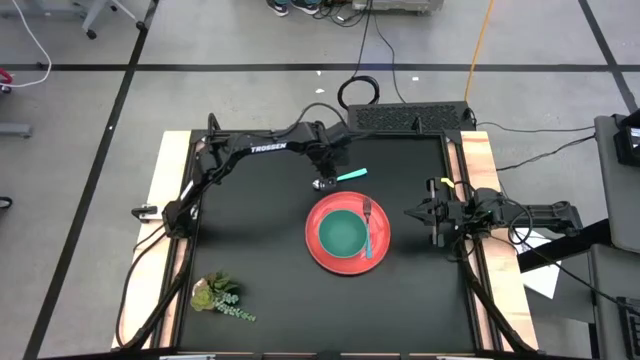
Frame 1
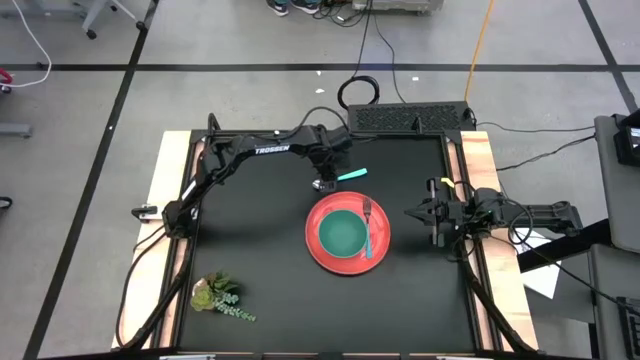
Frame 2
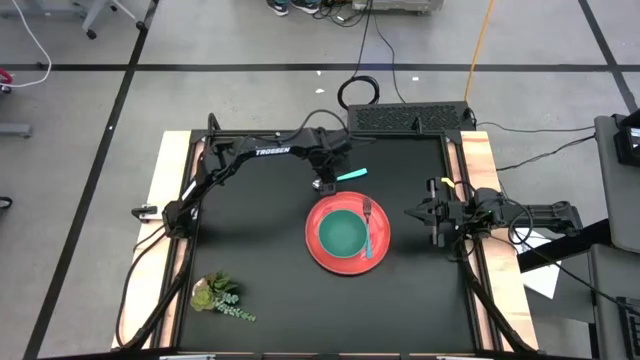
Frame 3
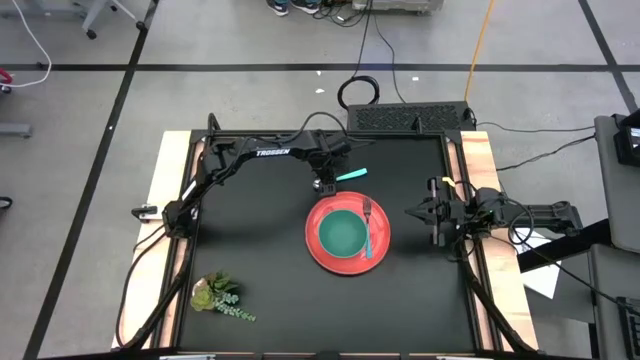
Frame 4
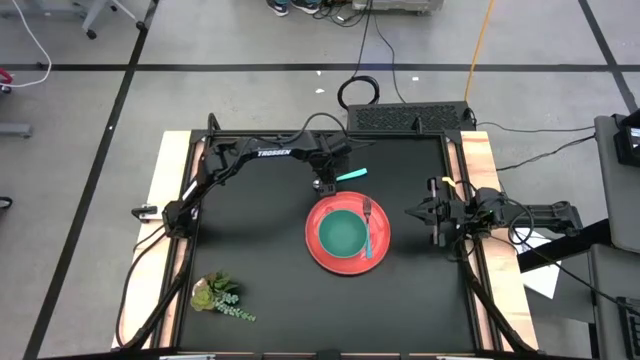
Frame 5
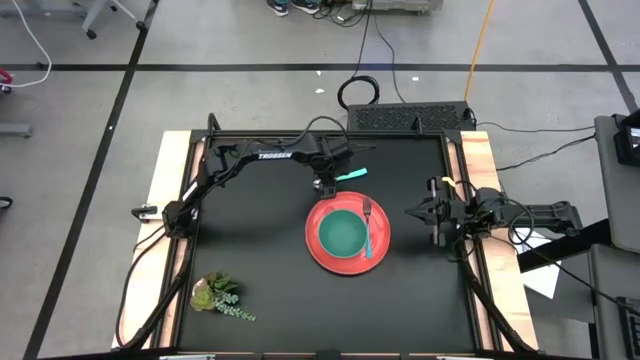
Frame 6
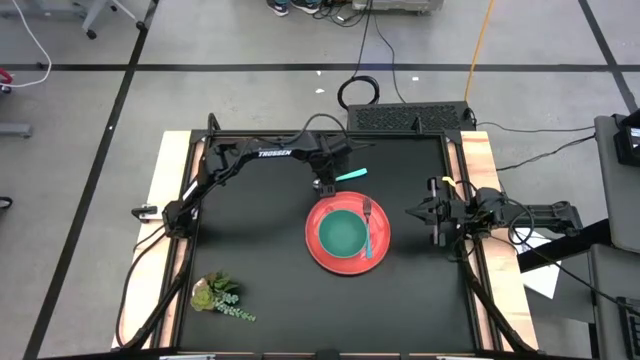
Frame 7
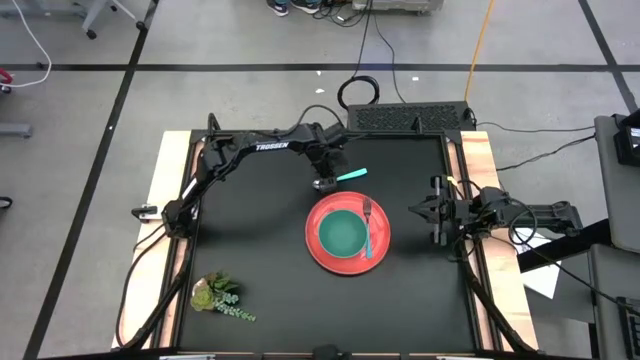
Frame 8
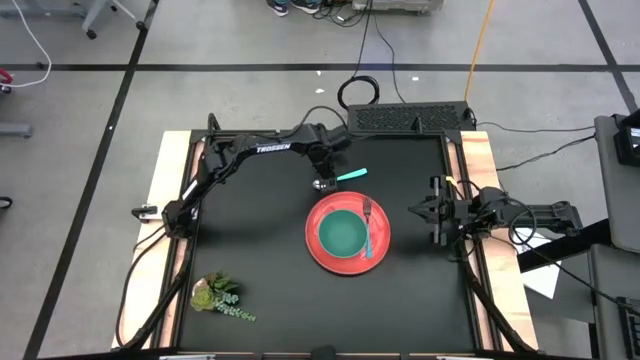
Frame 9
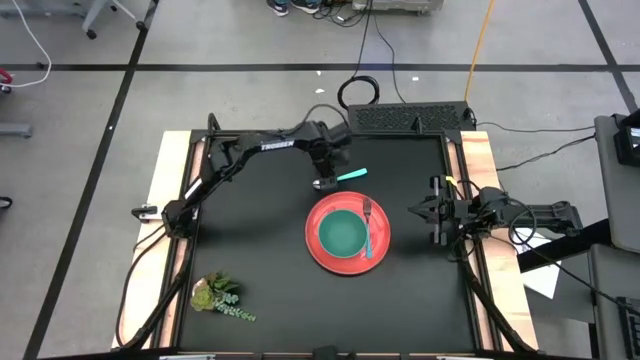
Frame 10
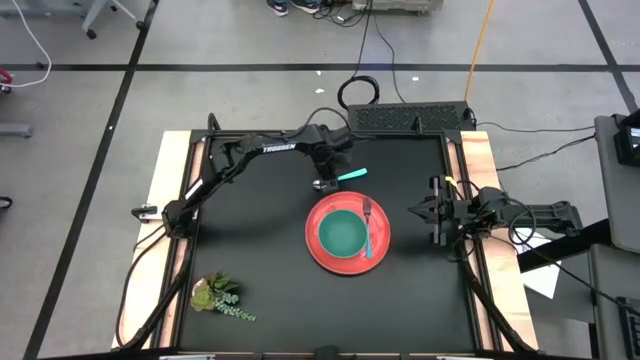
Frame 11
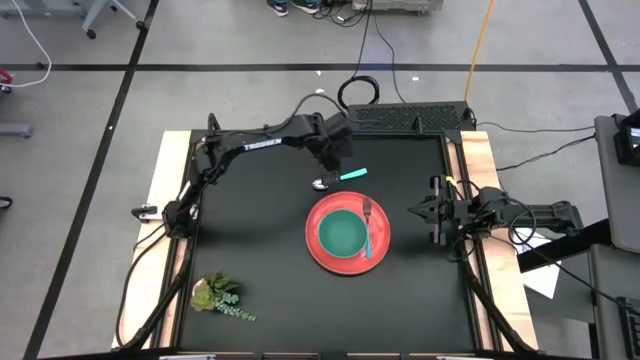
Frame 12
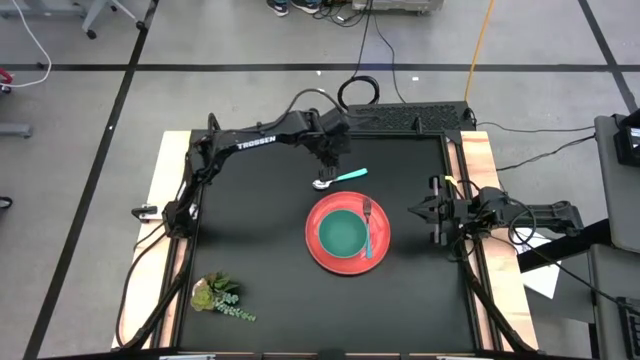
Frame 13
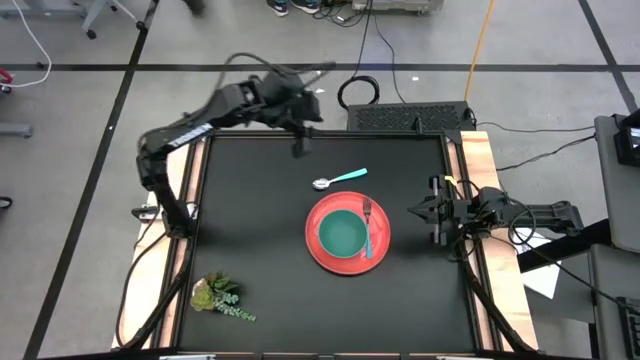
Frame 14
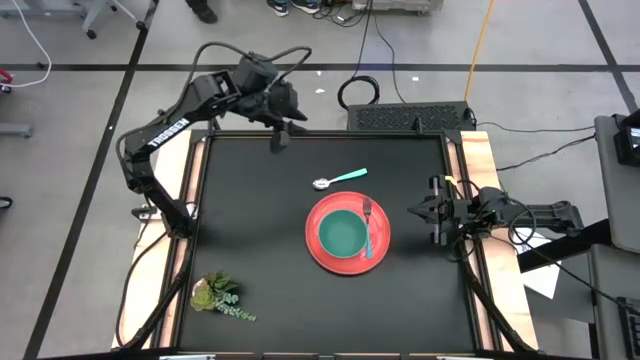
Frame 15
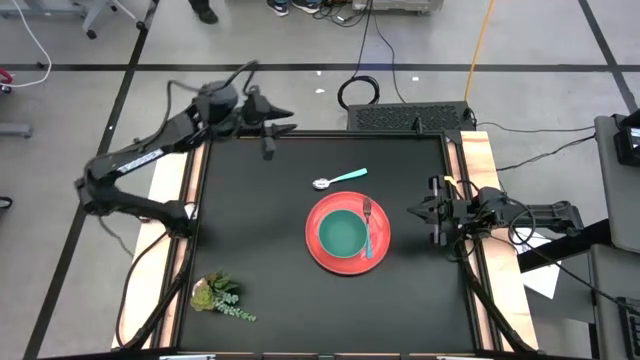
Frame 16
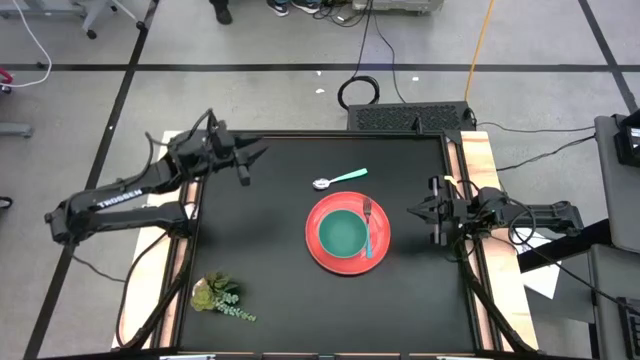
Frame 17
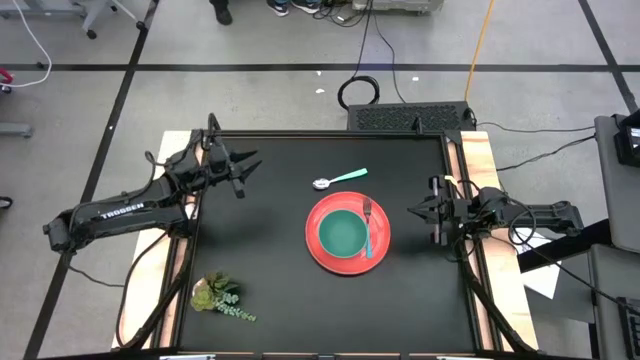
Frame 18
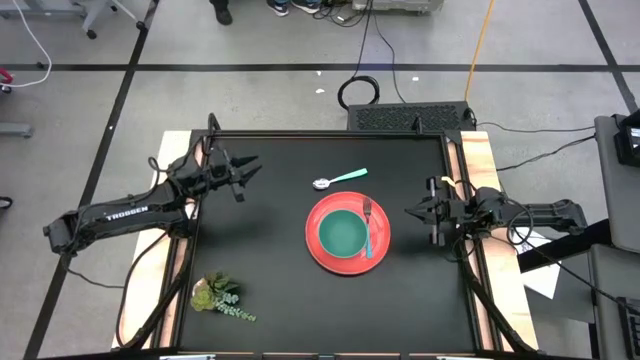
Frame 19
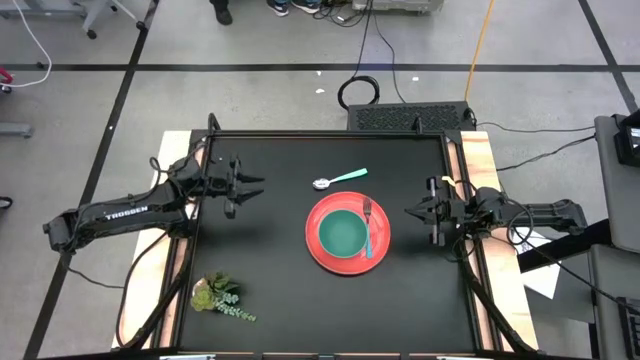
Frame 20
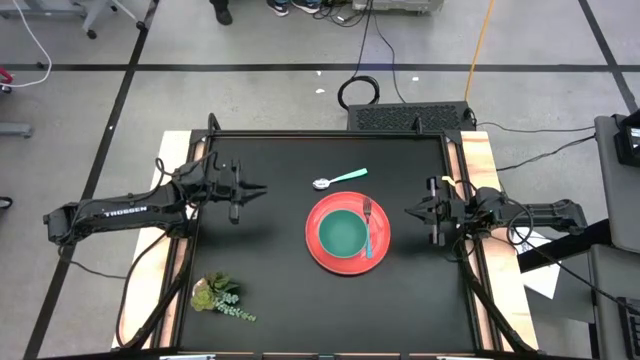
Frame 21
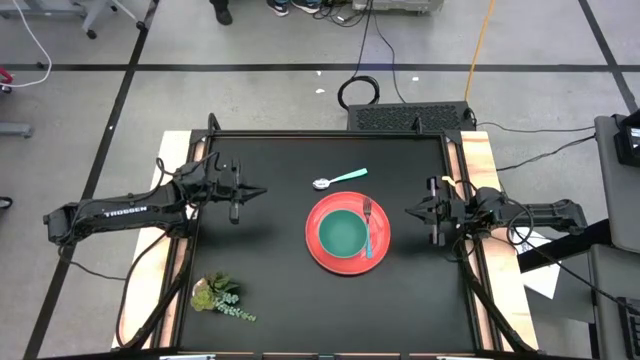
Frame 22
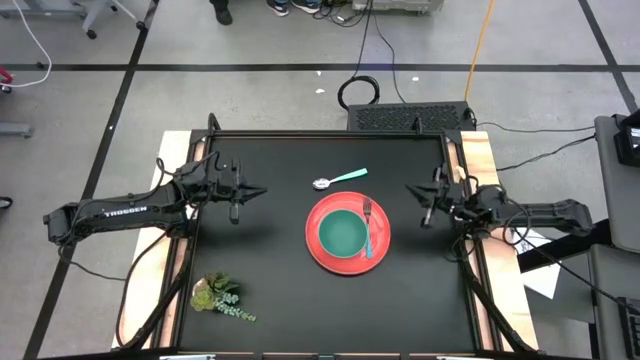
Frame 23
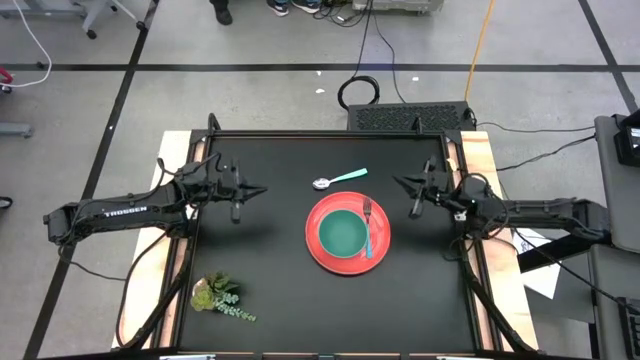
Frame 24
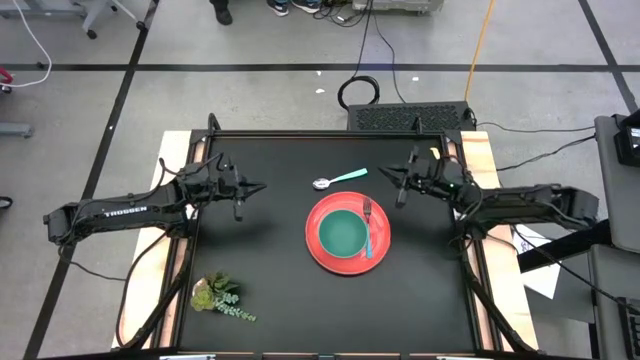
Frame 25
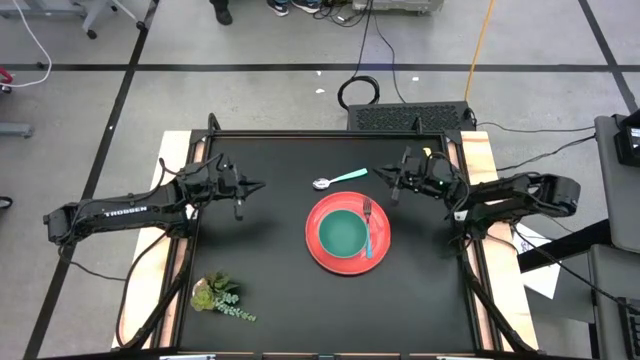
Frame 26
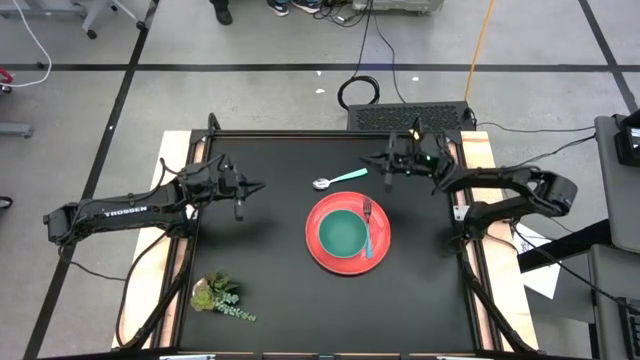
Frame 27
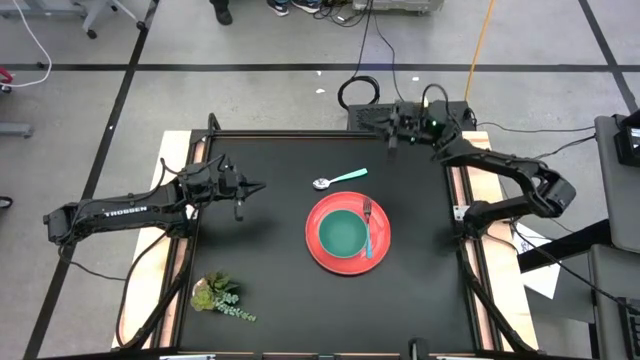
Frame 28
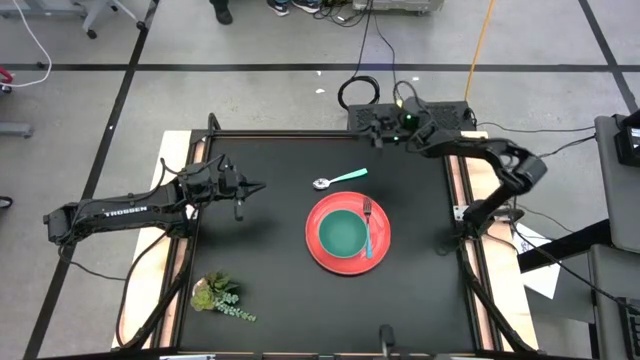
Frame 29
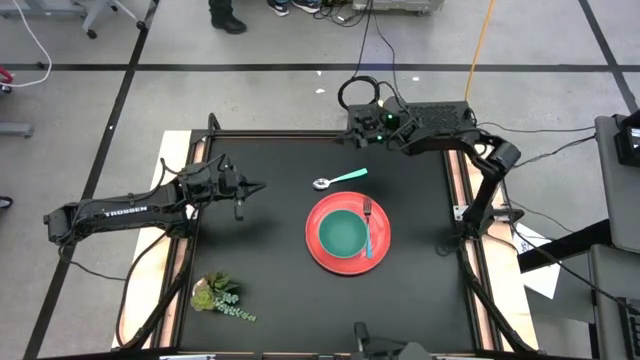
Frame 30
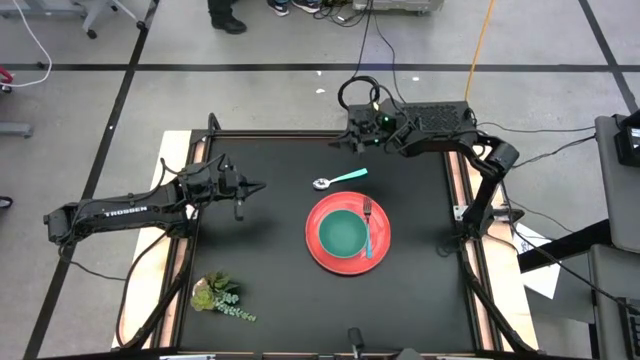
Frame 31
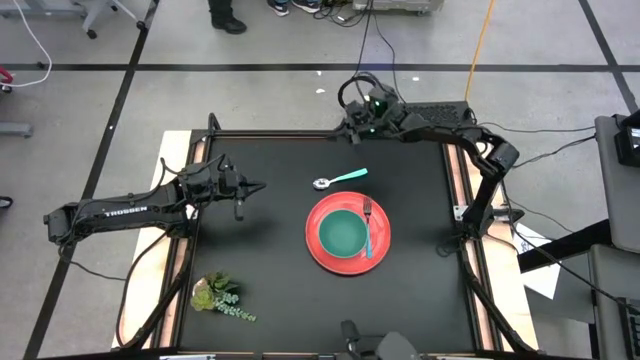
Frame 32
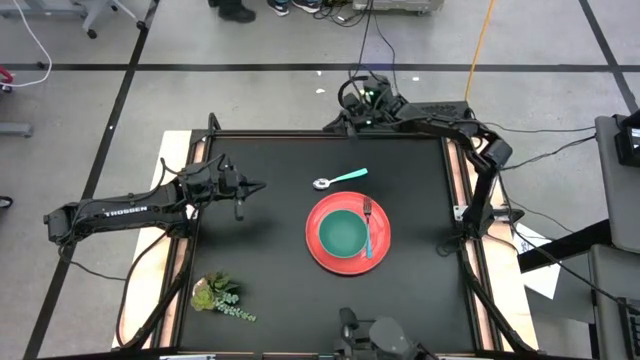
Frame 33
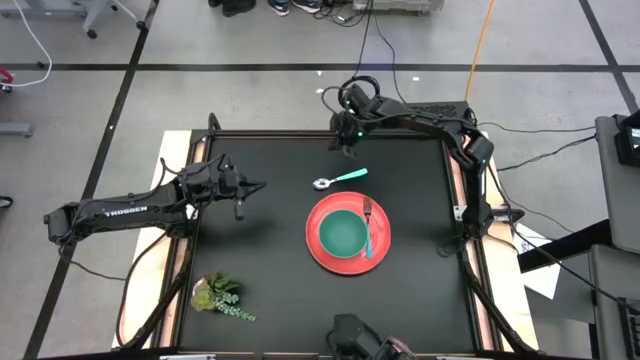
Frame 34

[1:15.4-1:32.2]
Task: Set table place
Put the blue spoon into the green bowl

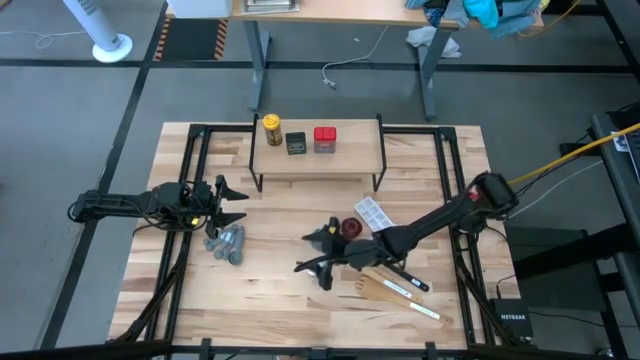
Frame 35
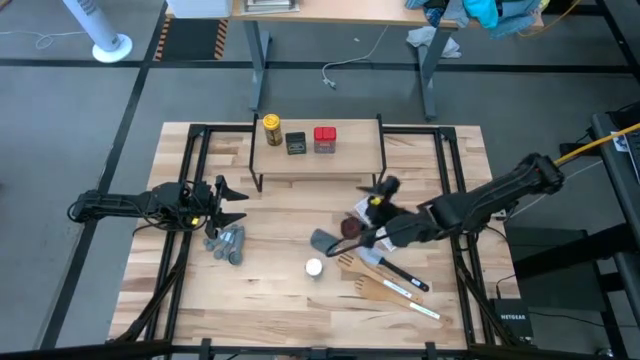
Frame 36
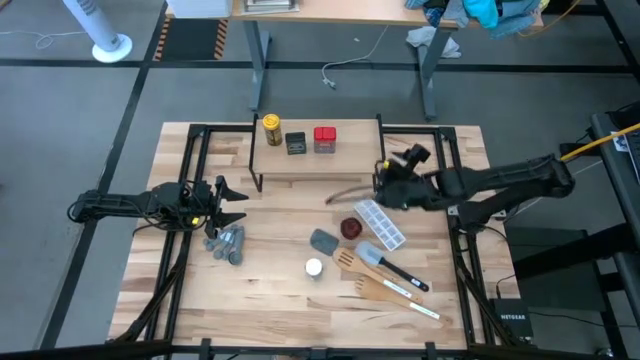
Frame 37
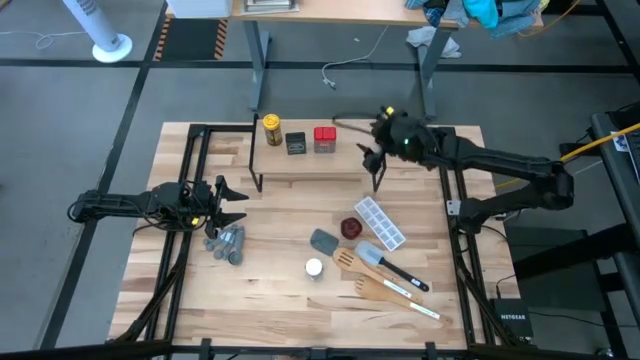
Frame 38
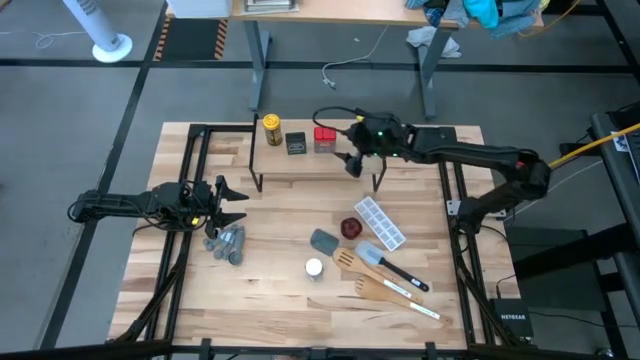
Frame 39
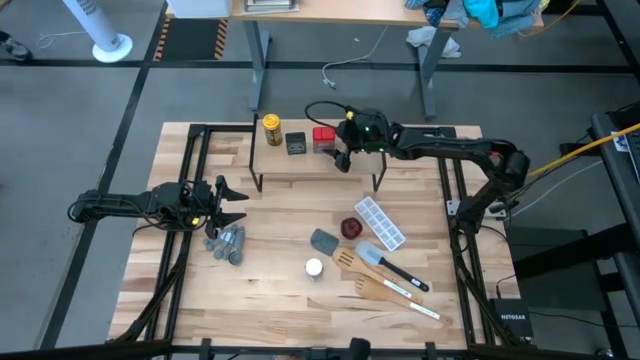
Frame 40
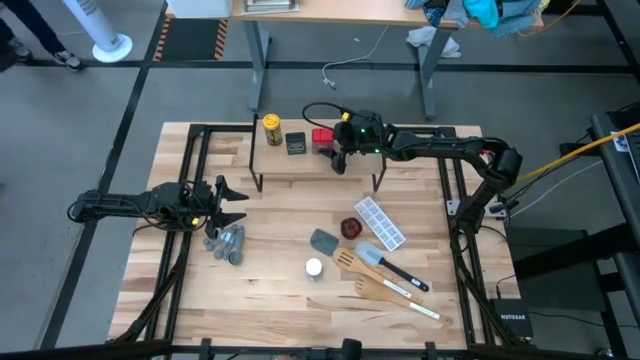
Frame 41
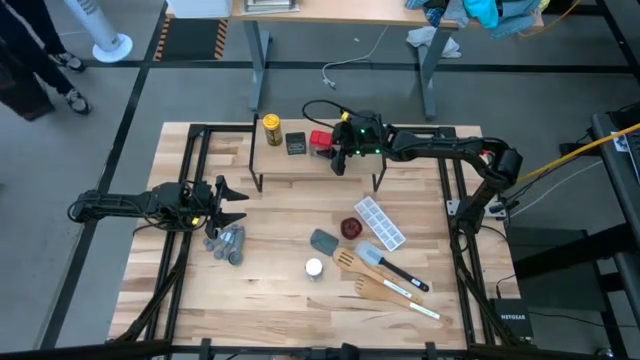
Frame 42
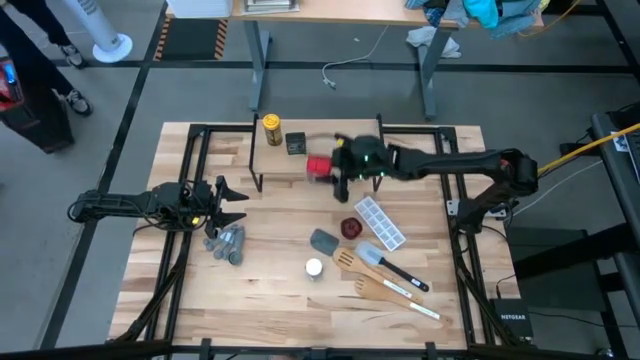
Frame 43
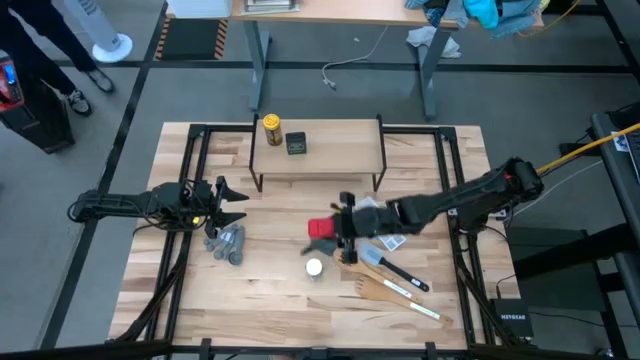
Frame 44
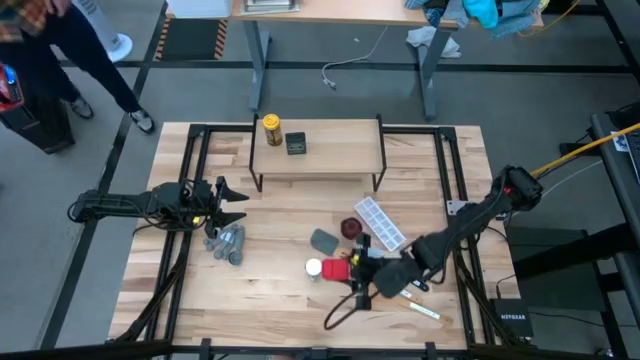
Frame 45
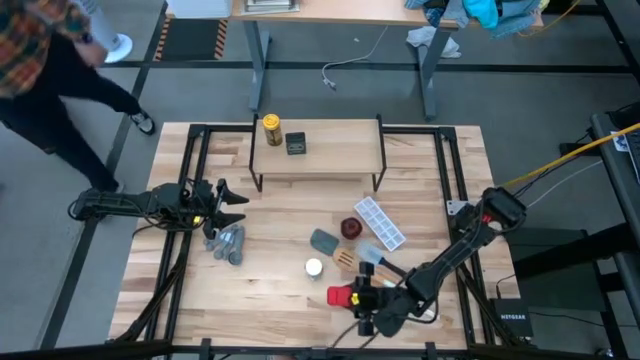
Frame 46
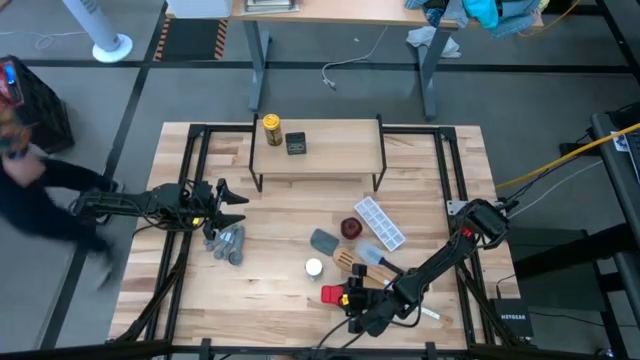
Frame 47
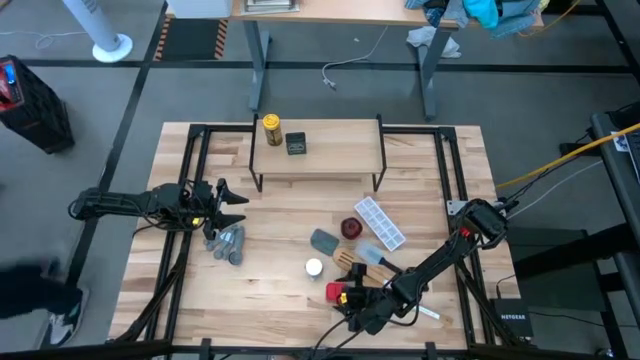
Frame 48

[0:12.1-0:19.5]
Task: Shelf spices
Remove the red seasoning can from the shelf
